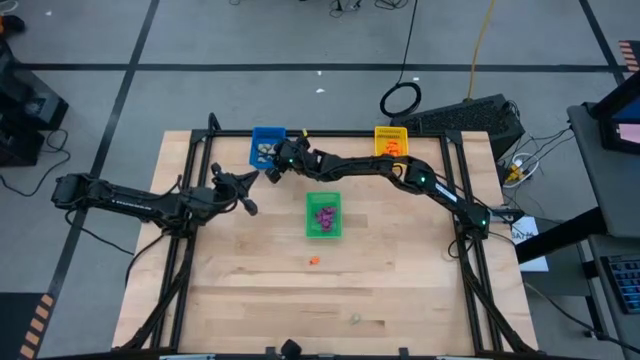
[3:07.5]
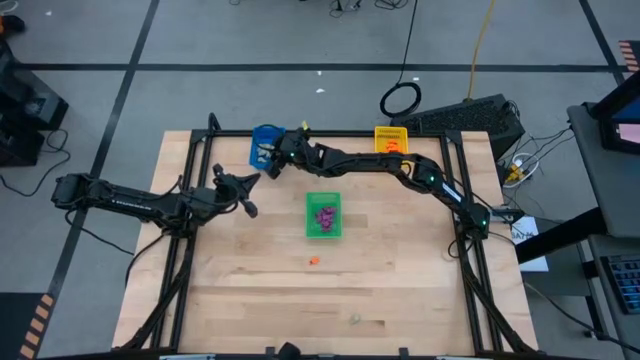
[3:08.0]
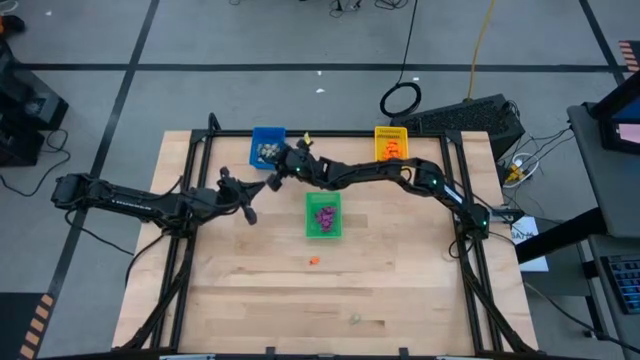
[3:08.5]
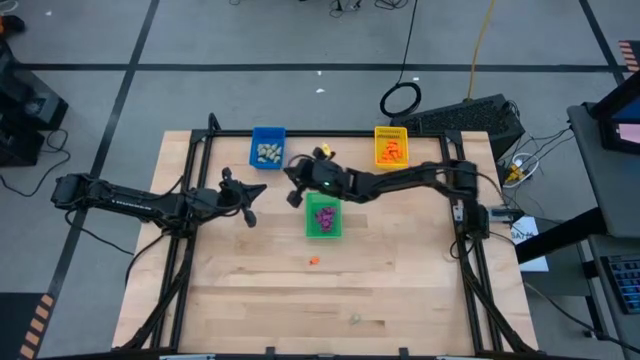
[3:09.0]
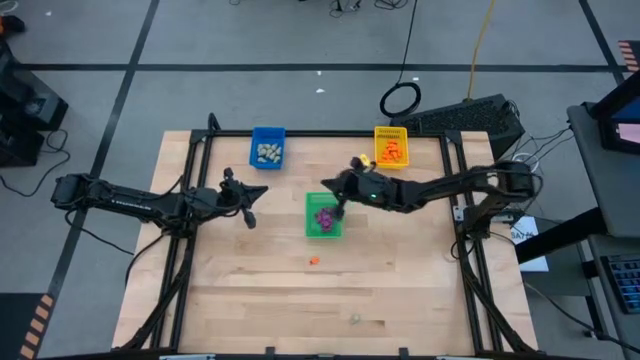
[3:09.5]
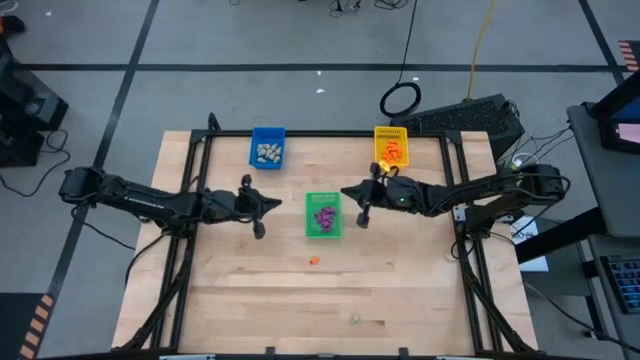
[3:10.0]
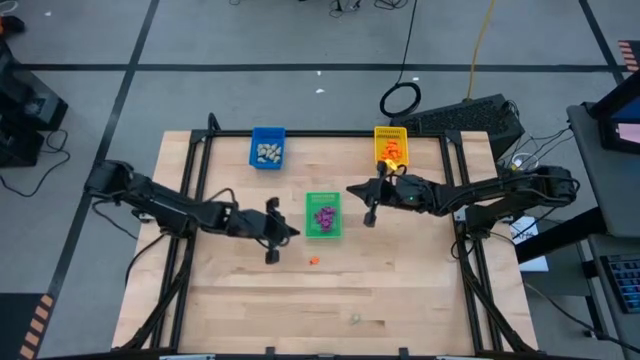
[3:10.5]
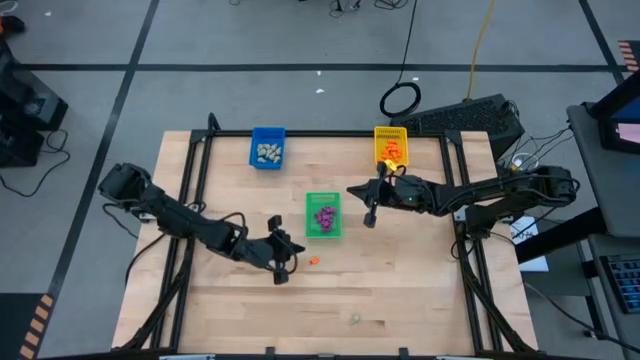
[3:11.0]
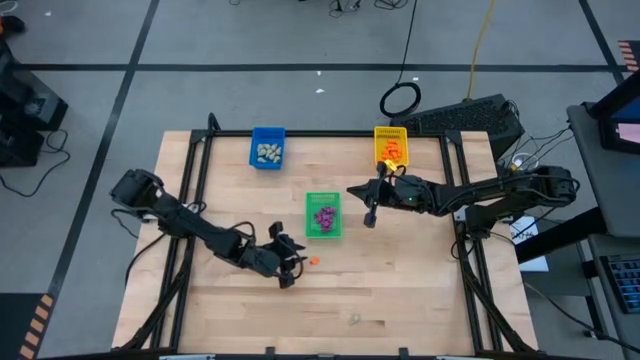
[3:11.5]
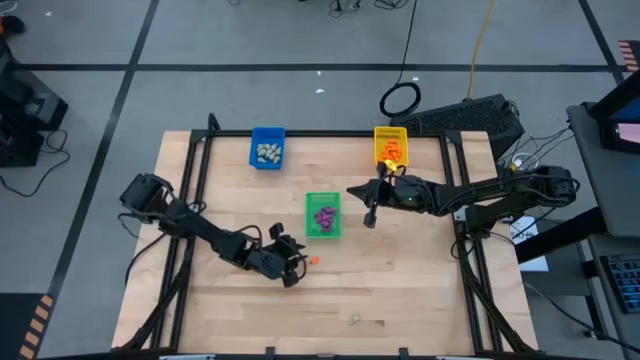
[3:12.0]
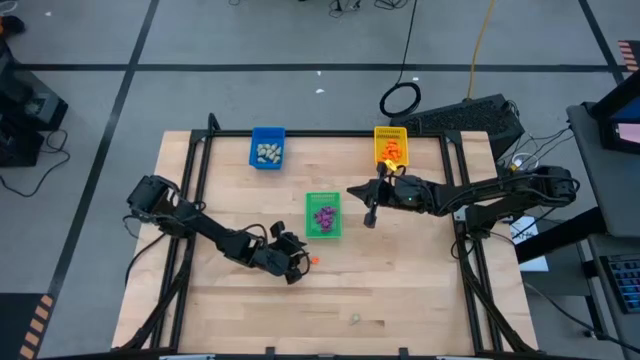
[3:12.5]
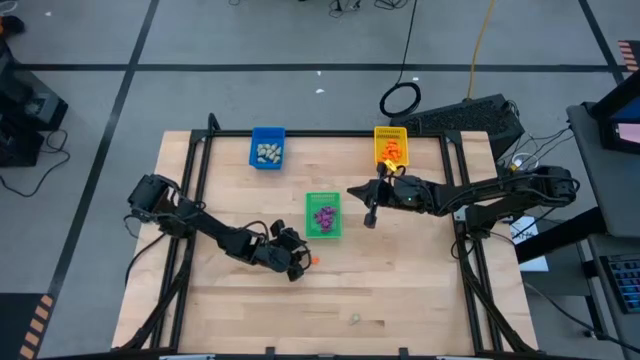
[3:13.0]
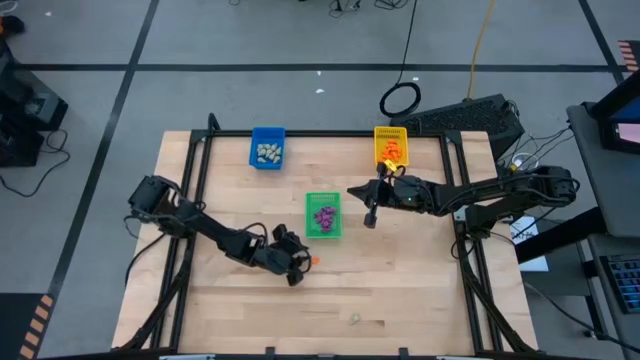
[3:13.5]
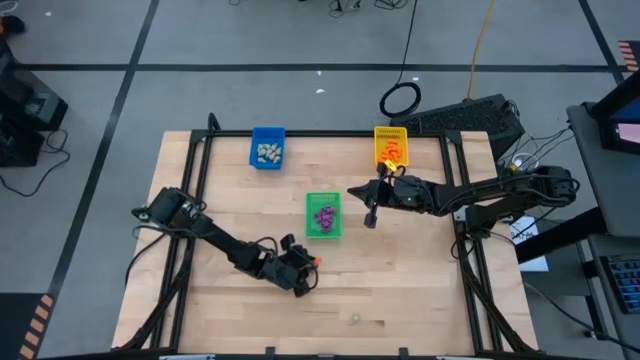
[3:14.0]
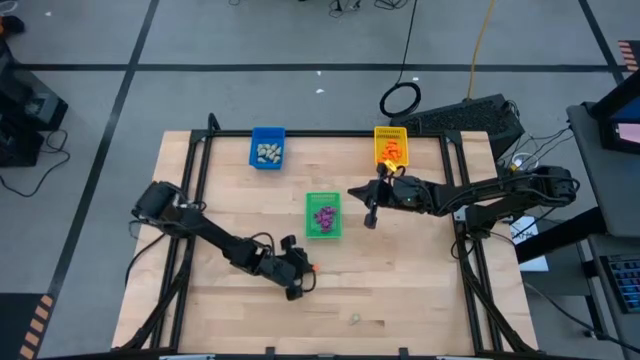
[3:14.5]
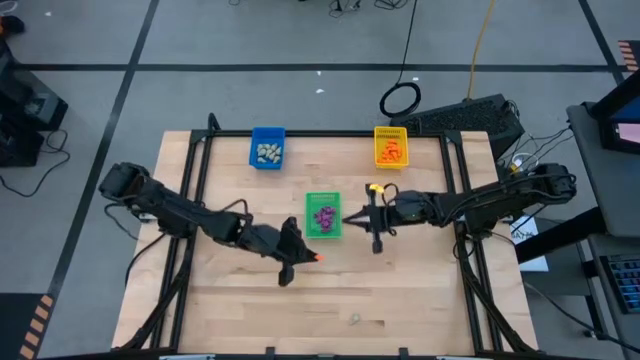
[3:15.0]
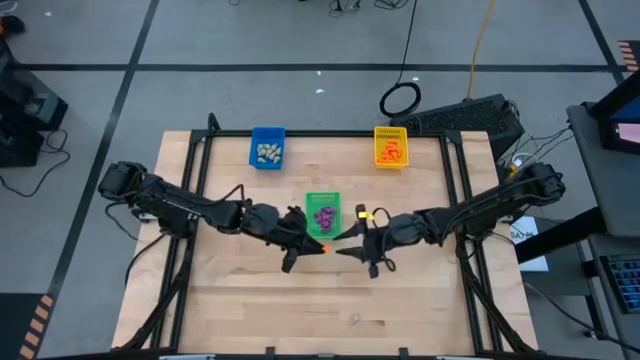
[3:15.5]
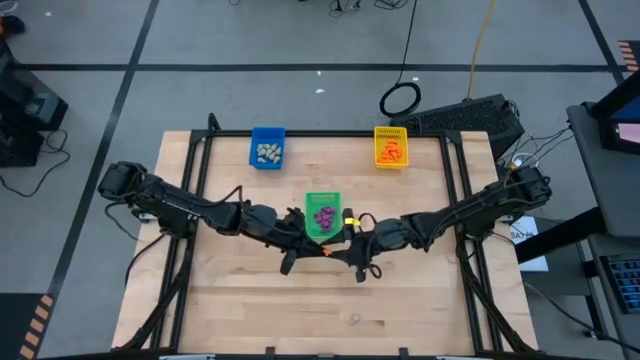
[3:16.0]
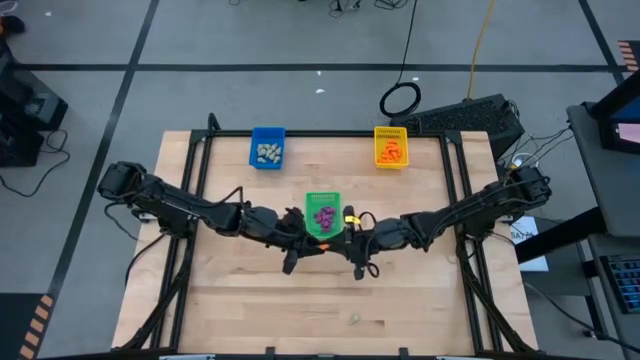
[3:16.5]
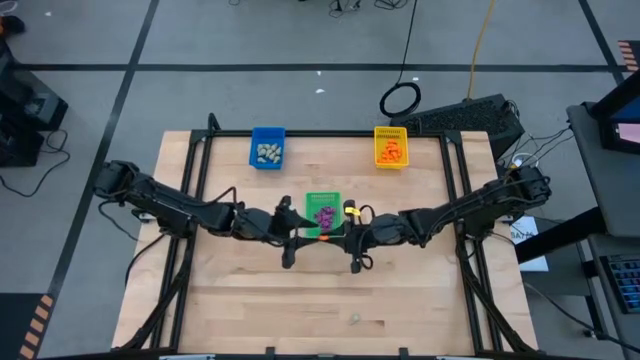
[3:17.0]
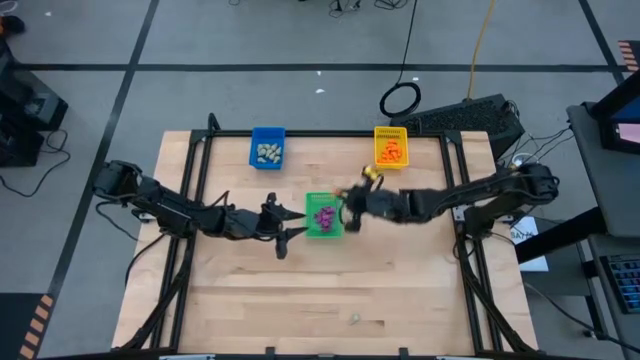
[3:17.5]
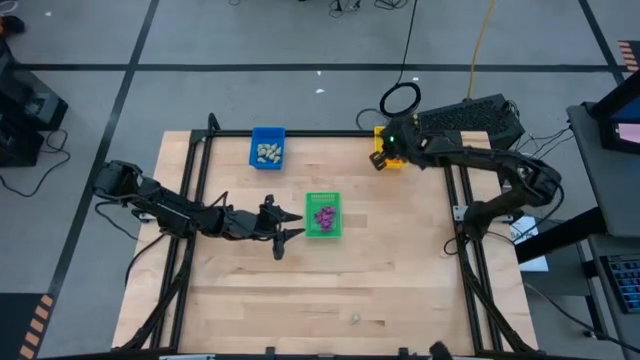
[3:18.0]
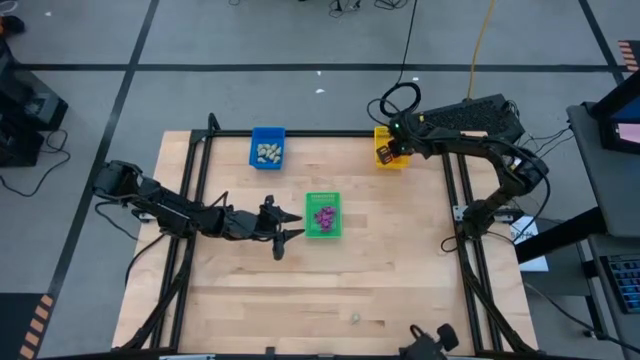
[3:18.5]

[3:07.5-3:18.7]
Task: Sort Halloween decoration
Put the orange skeleton toy into the yellow bin

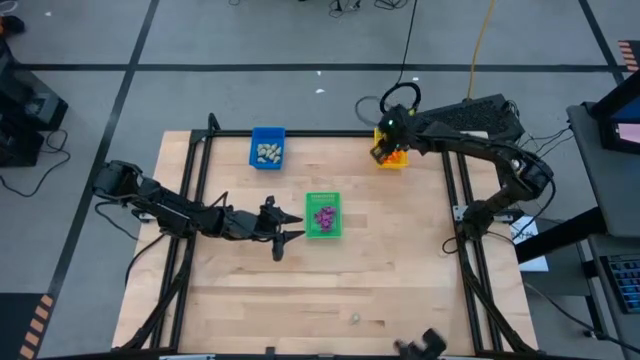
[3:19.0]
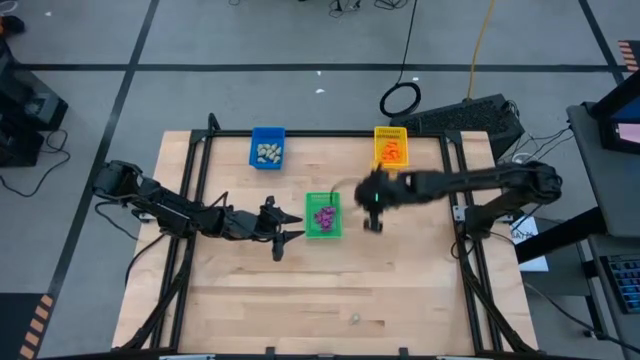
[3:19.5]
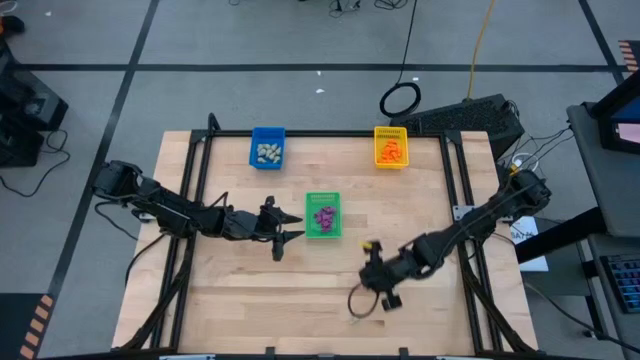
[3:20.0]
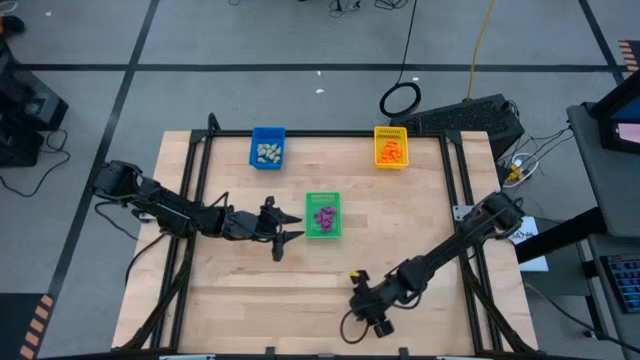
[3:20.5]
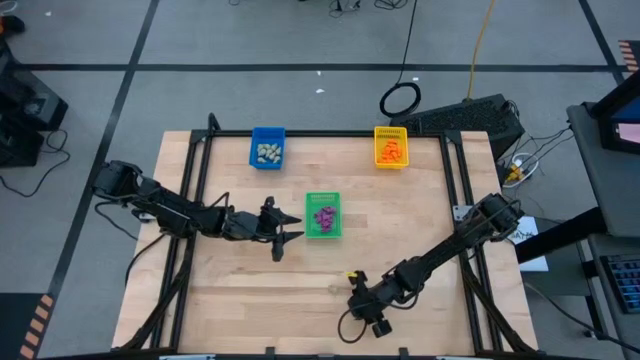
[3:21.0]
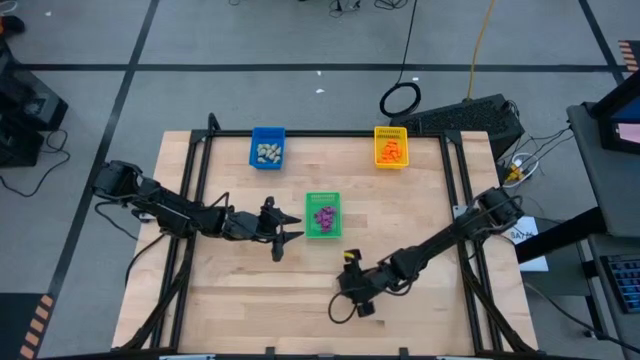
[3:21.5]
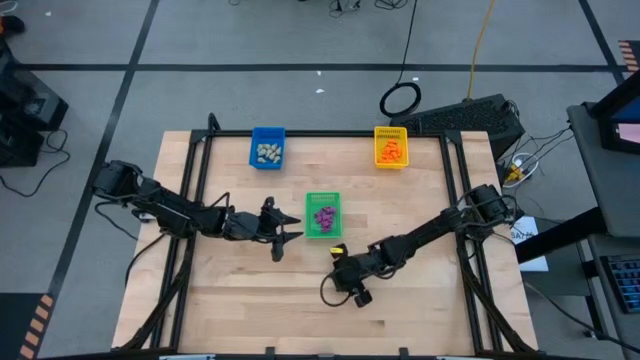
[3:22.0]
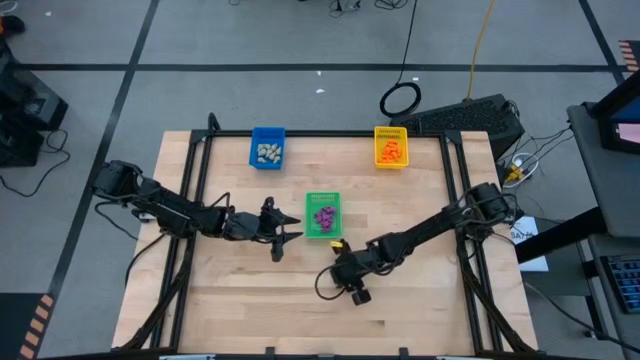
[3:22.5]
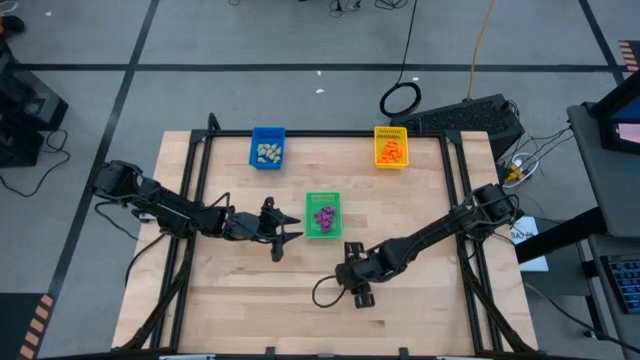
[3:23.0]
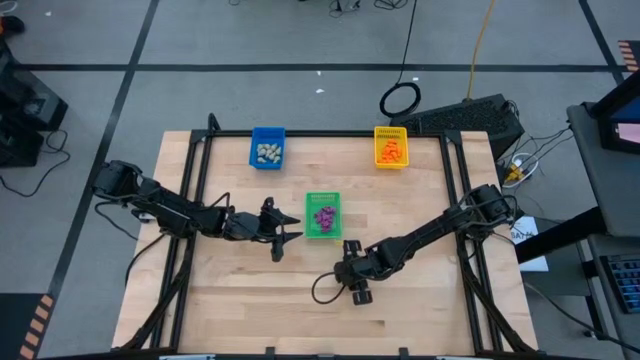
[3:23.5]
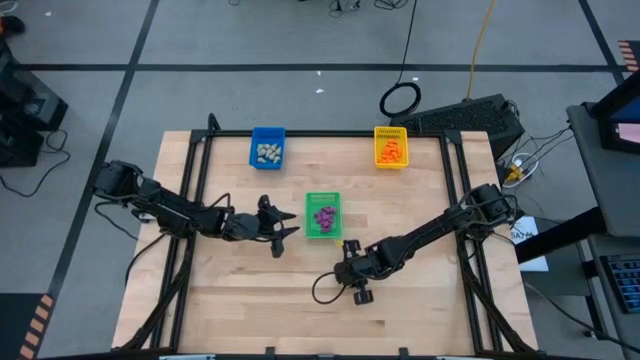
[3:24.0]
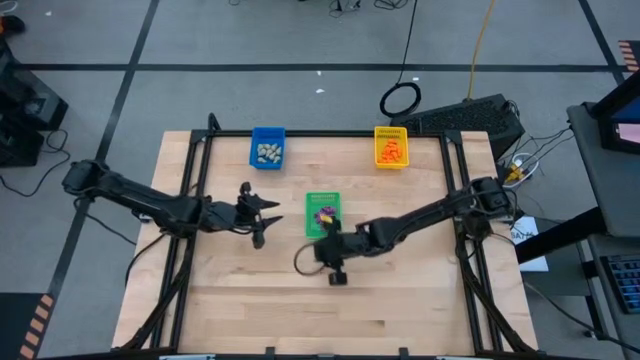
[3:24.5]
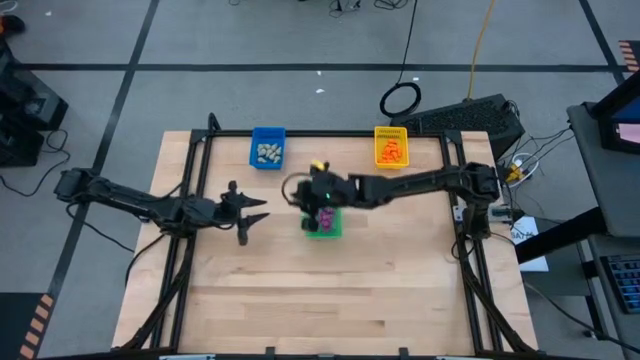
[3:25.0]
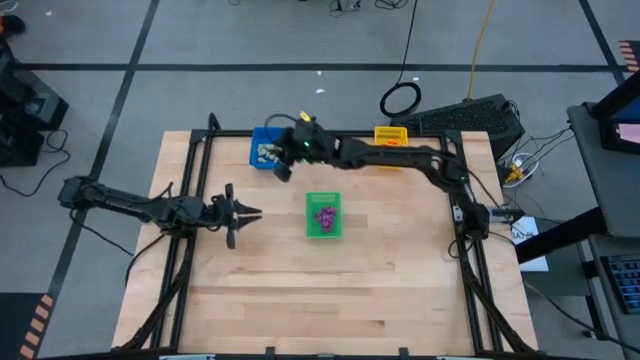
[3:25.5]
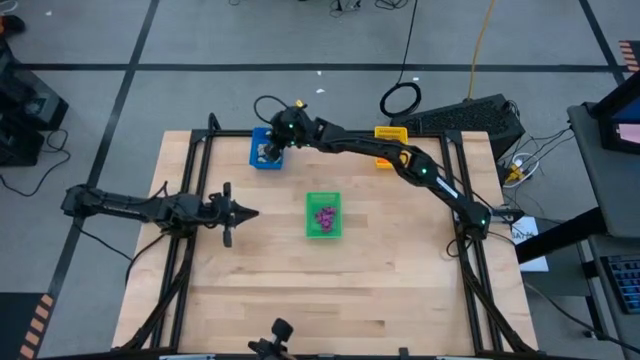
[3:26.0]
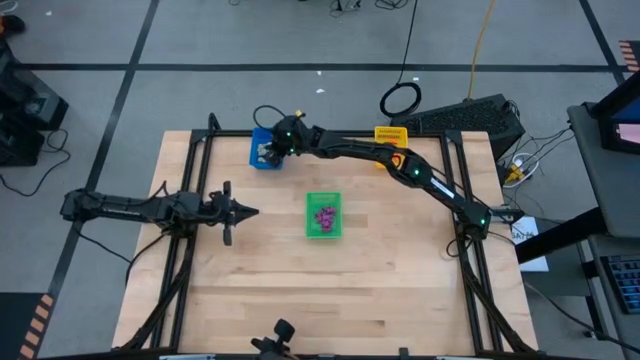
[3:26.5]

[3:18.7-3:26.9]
Put the white skull toy into the blue bin

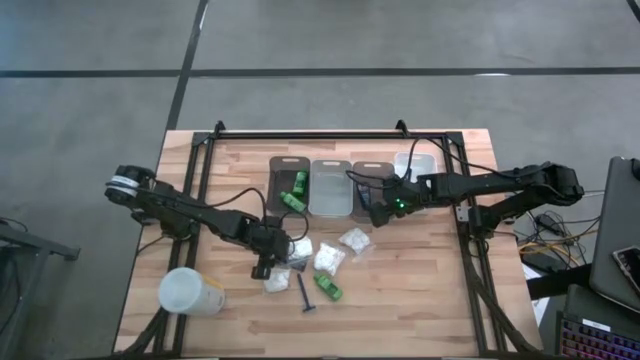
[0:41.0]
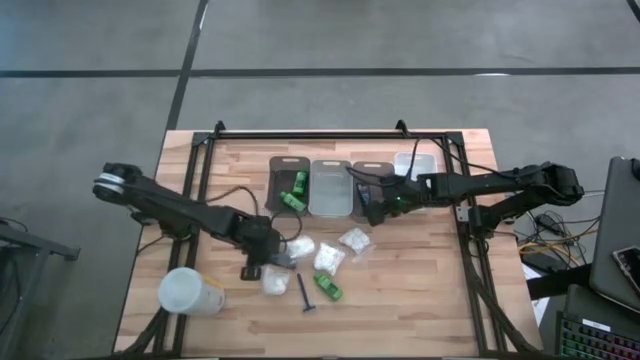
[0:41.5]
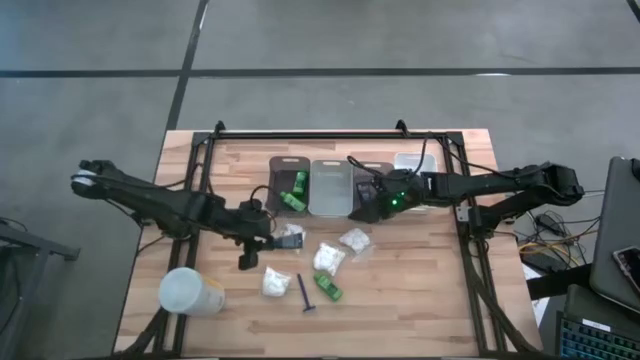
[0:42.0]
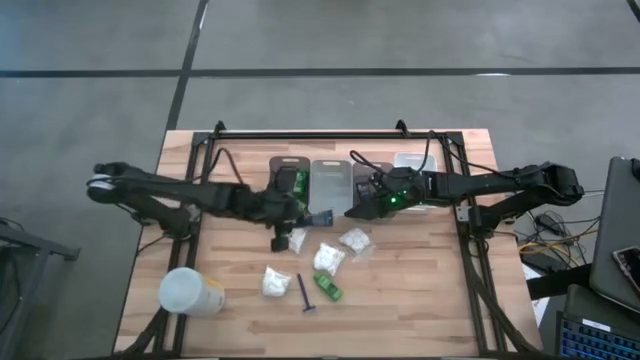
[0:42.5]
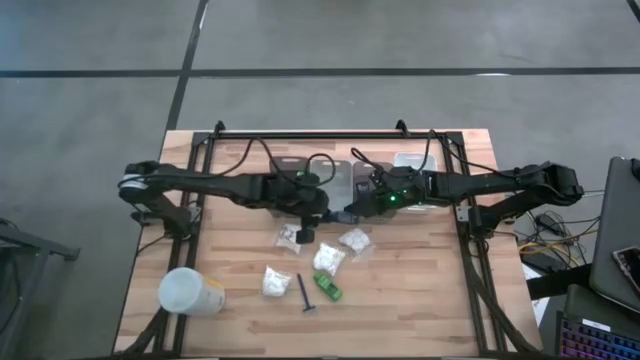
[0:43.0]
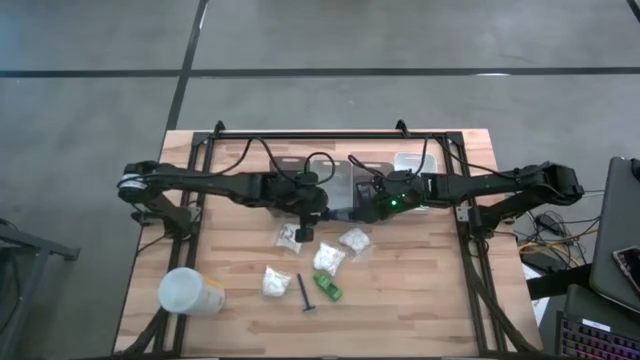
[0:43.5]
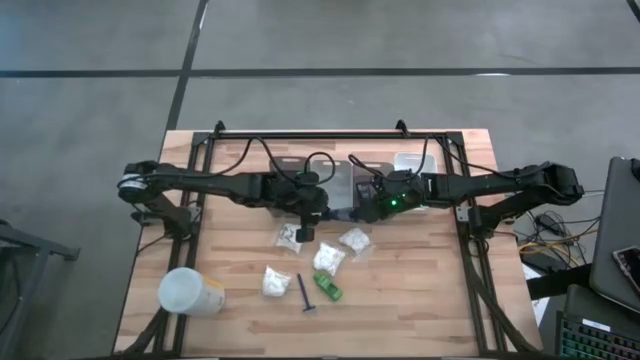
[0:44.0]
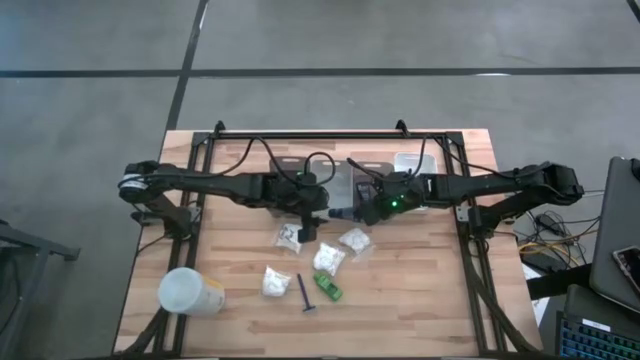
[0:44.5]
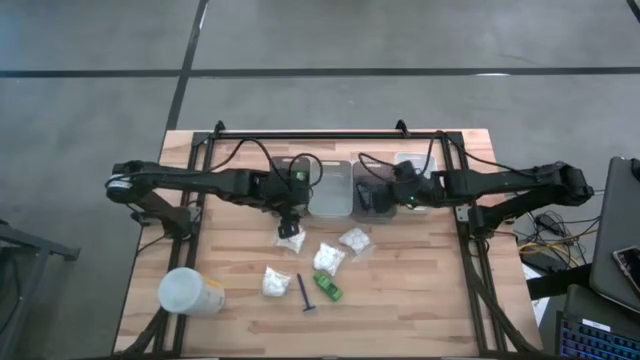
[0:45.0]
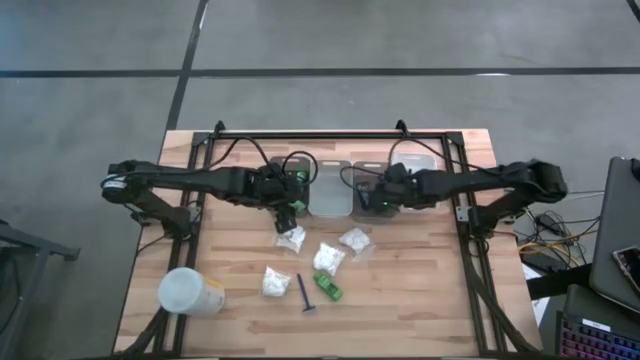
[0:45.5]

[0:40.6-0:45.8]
Task: Pick & Place Travel size toiletries
Put the blue shave cream into the right black bin
